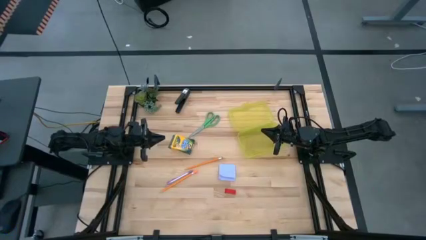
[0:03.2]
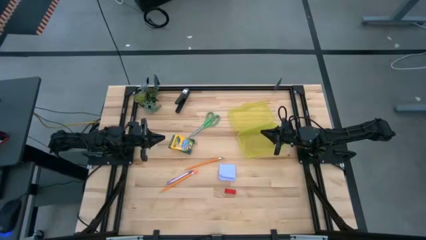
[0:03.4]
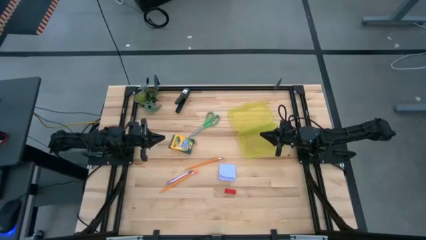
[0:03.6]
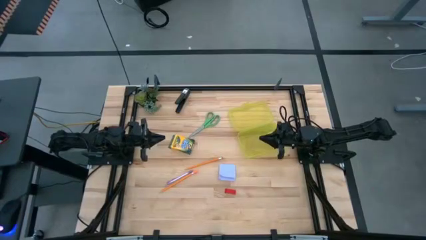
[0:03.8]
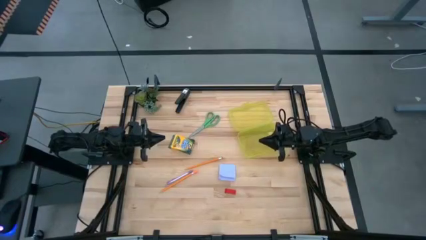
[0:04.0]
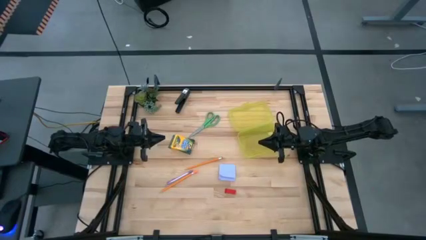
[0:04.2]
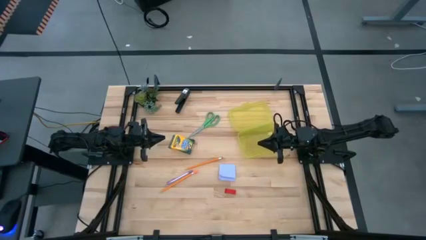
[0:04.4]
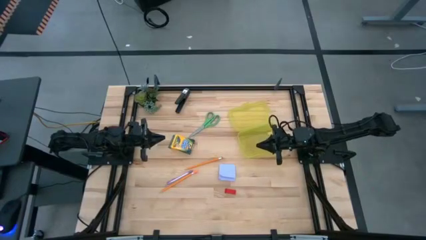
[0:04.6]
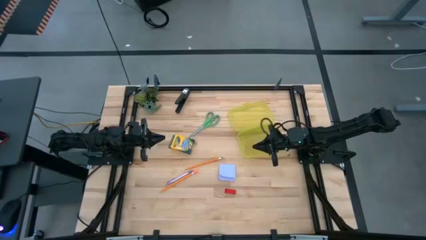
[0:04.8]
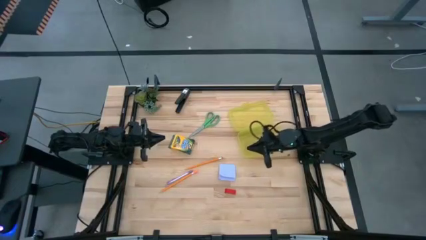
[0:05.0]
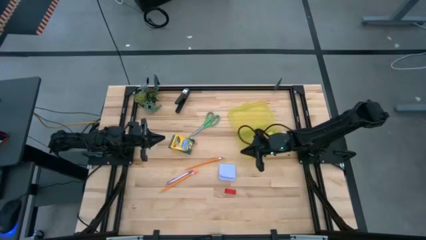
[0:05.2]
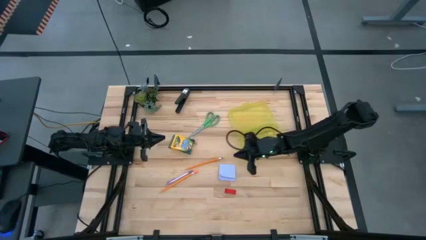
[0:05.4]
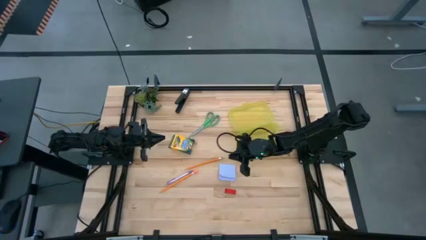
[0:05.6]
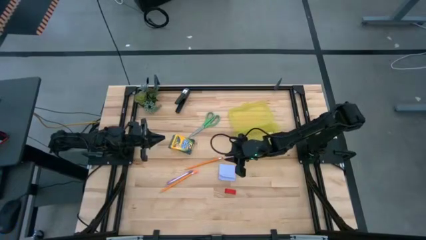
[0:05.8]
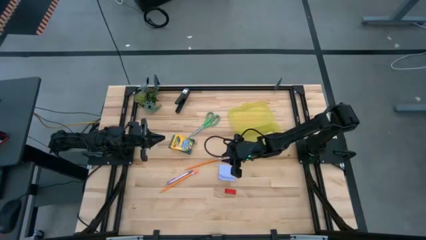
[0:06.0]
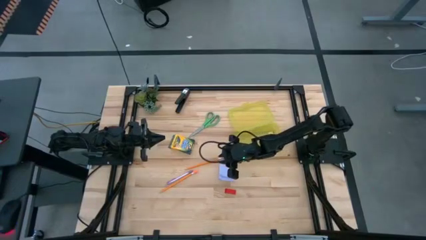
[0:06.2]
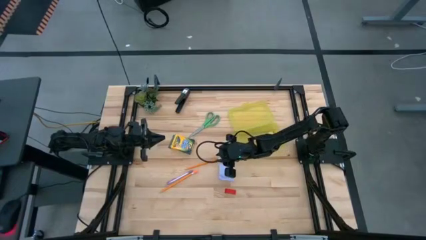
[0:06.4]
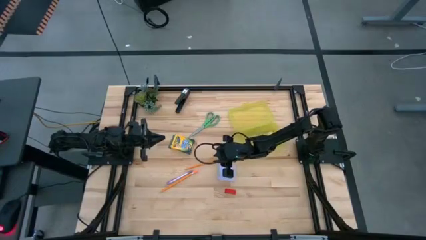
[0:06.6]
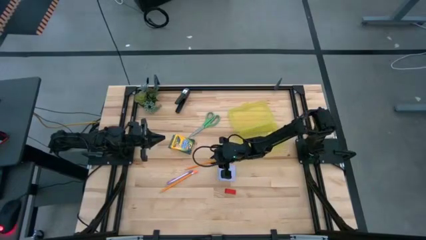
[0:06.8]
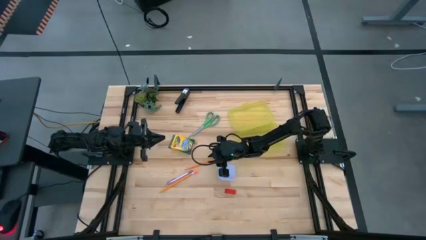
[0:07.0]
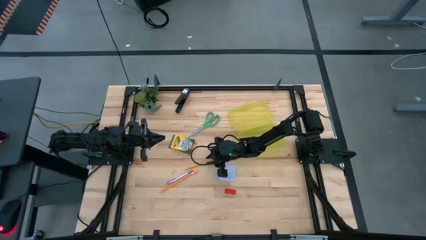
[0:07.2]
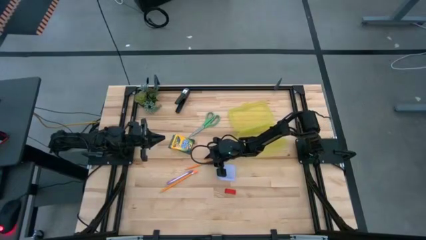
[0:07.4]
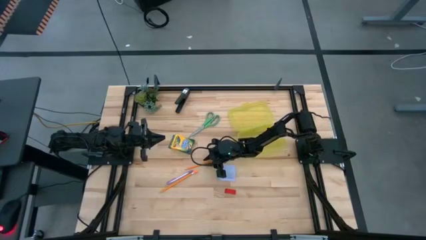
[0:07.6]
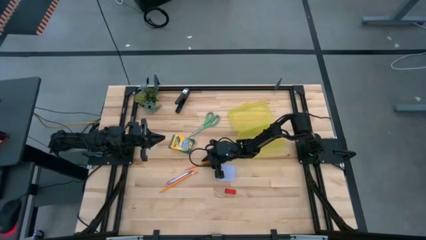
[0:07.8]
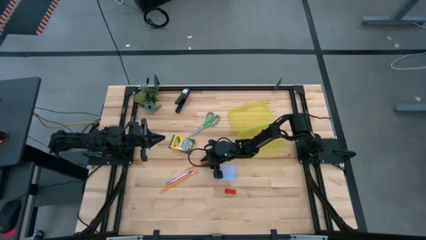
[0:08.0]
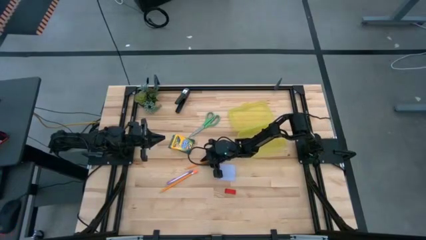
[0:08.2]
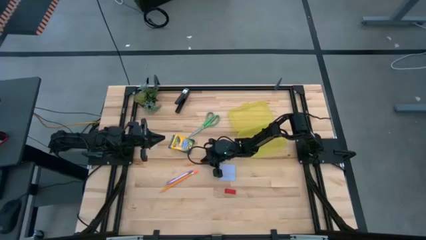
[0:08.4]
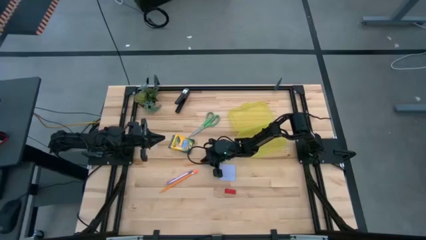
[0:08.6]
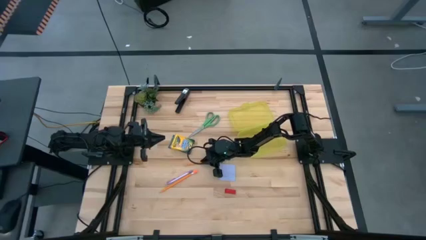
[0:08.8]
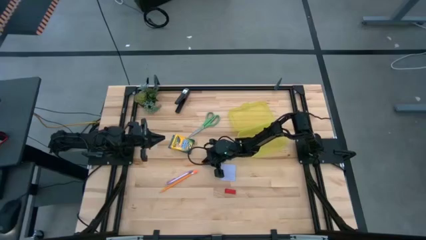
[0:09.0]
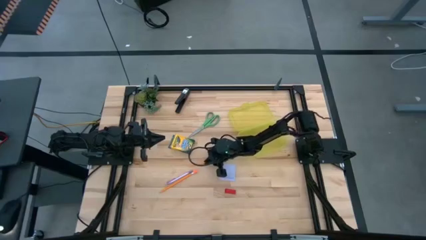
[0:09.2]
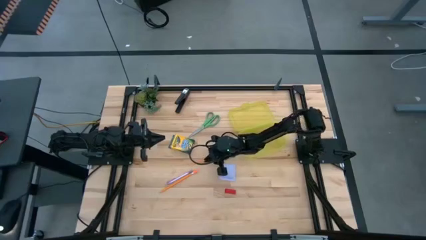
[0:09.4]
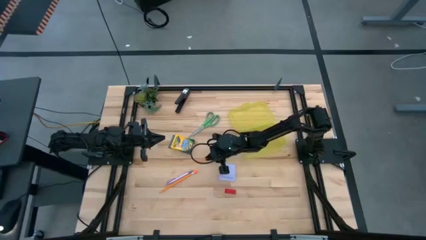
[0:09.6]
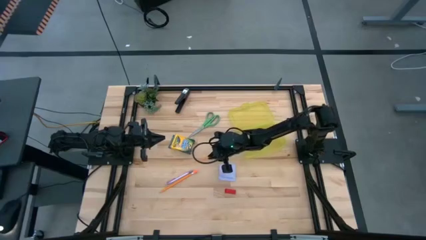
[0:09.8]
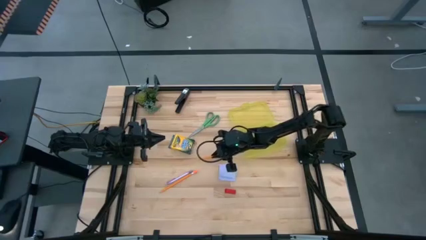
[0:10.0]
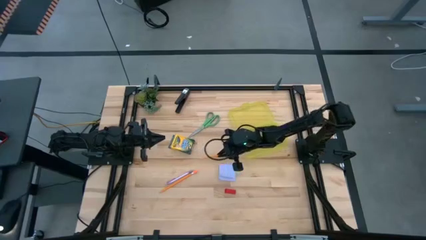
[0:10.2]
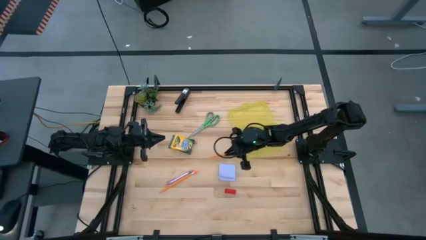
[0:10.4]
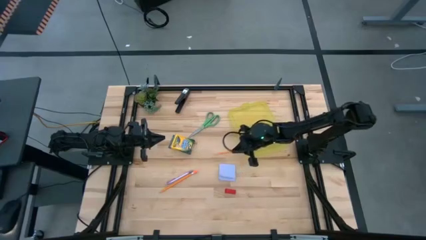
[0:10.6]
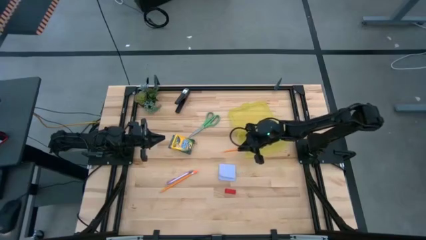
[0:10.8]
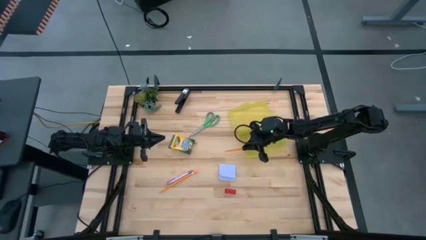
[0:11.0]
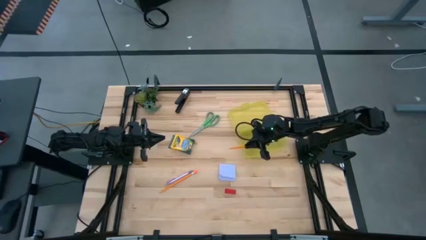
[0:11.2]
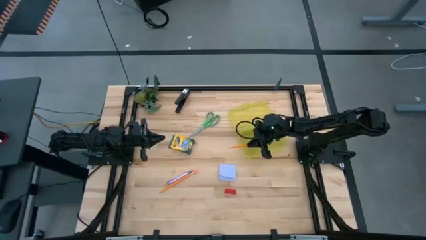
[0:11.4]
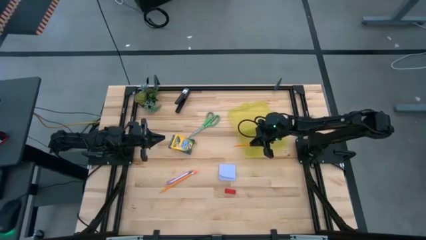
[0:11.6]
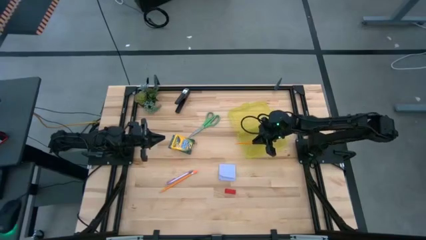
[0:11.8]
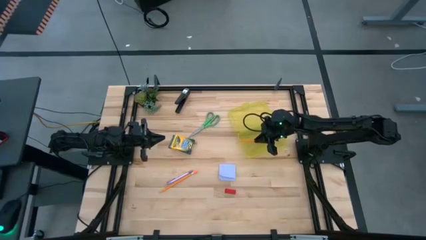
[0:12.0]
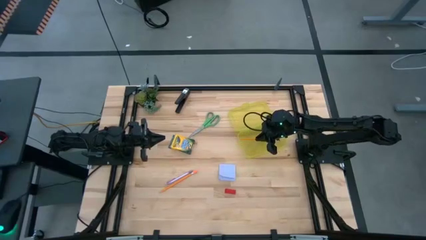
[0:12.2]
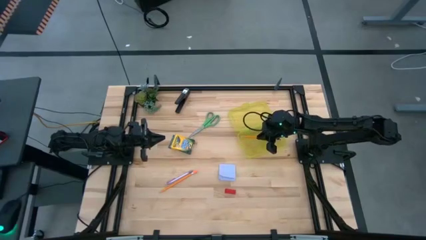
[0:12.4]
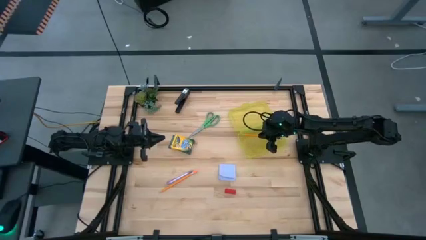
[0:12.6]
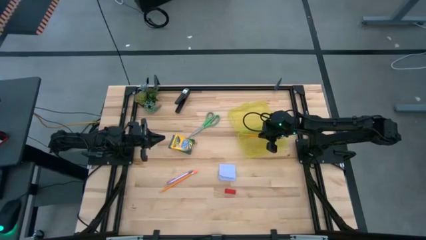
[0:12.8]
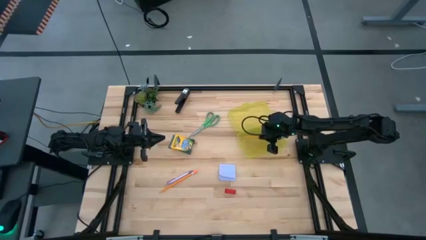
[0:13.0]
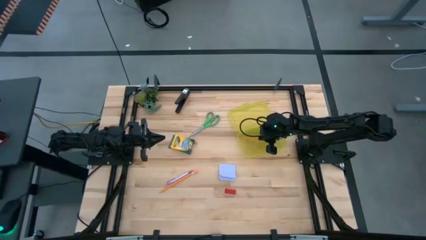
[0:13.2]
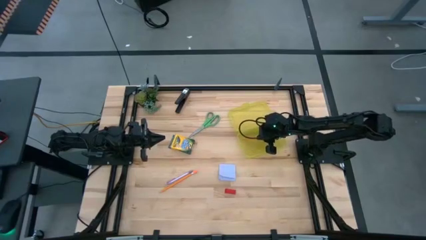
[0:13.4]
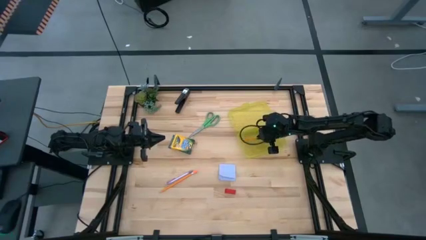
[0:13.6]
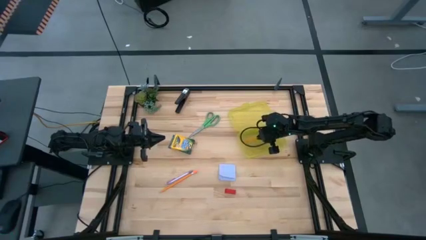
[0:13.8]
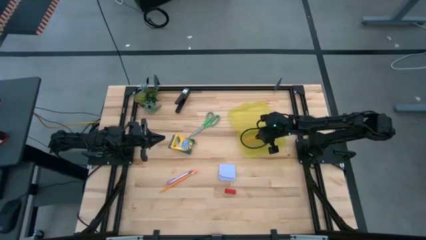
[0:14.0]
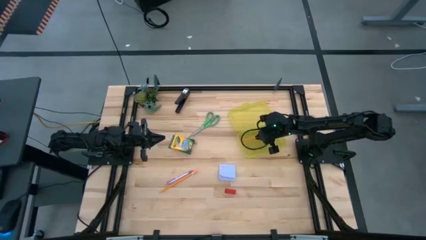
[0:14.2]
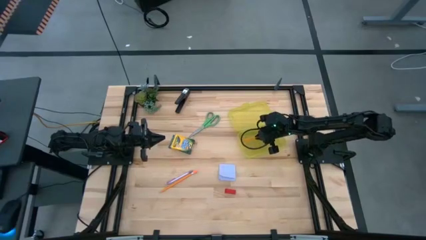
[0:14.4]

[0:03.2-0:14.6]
Task: Pack school essentials
Put the top yellow pencil into the yellow supply box

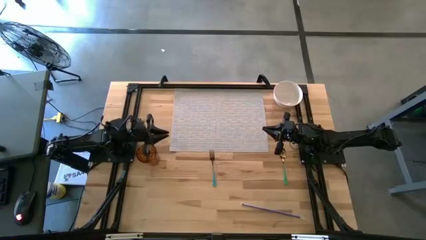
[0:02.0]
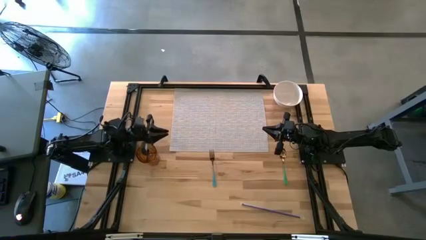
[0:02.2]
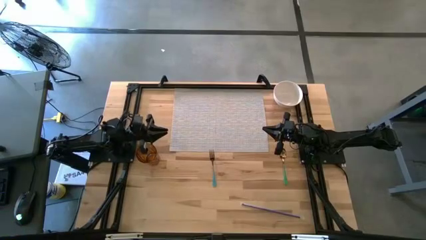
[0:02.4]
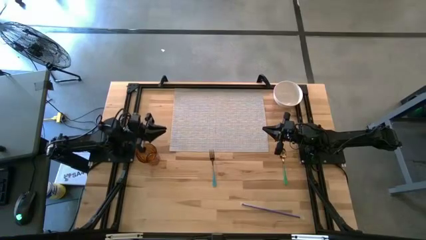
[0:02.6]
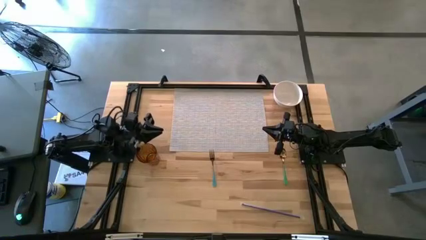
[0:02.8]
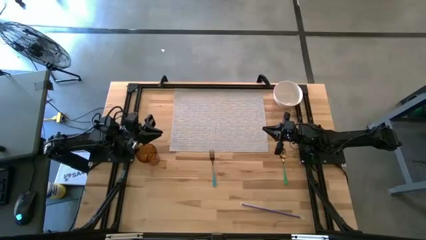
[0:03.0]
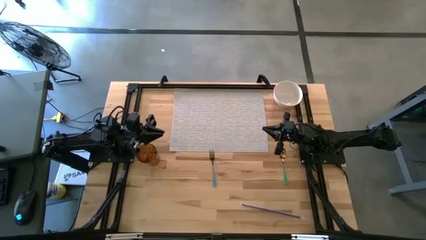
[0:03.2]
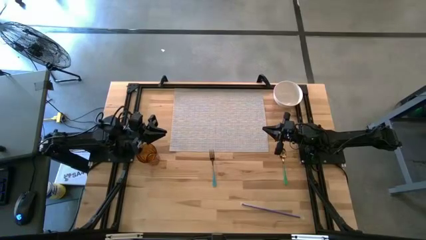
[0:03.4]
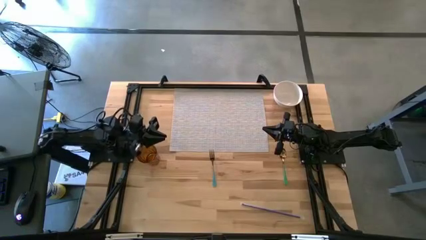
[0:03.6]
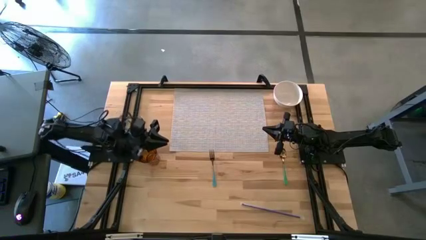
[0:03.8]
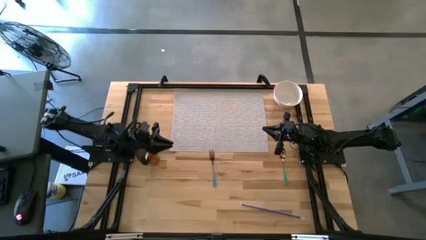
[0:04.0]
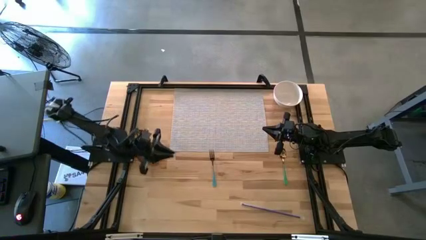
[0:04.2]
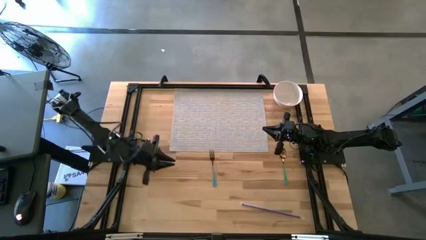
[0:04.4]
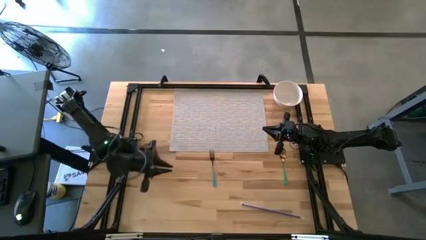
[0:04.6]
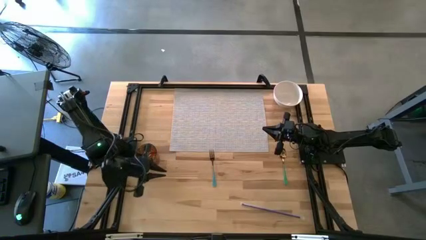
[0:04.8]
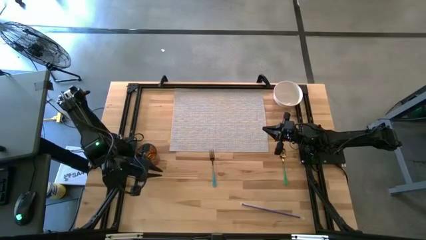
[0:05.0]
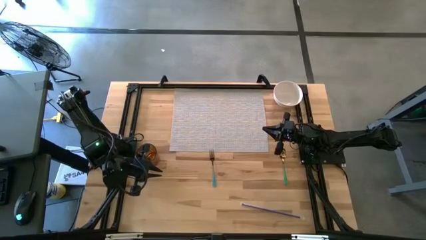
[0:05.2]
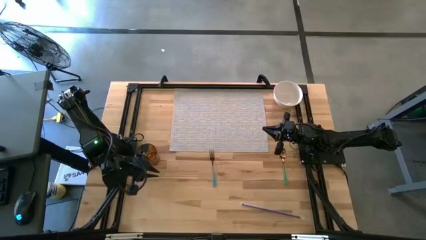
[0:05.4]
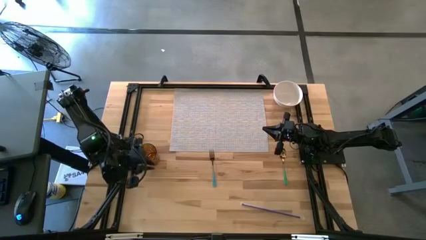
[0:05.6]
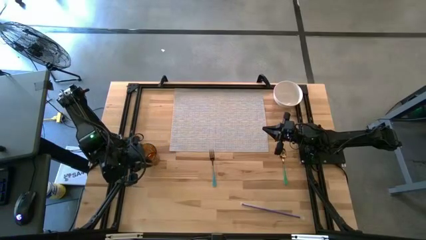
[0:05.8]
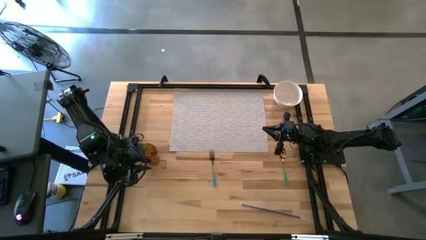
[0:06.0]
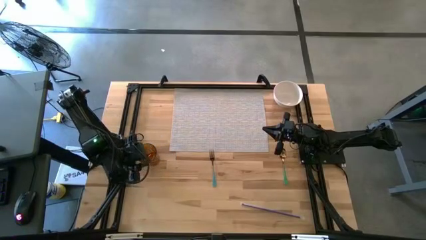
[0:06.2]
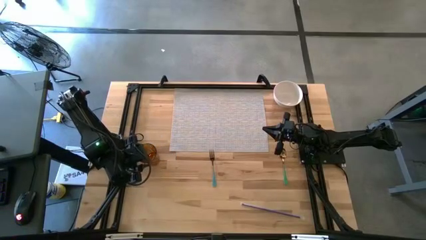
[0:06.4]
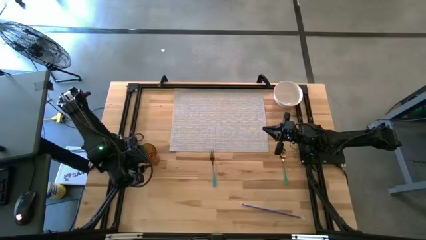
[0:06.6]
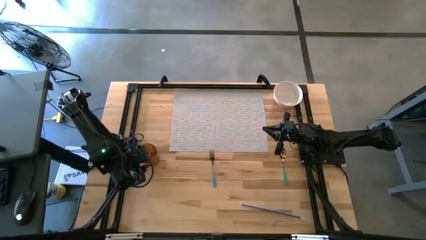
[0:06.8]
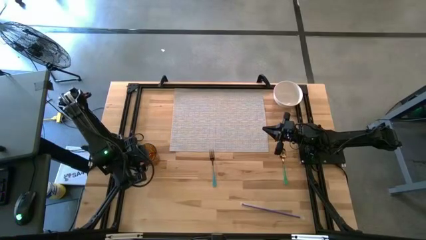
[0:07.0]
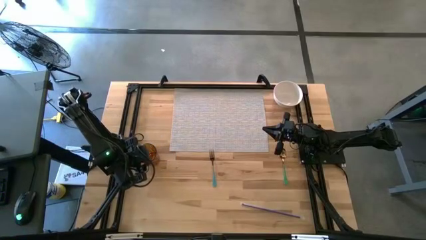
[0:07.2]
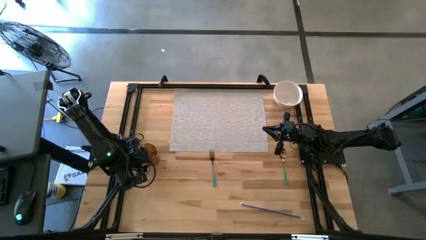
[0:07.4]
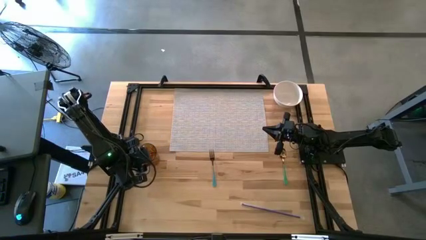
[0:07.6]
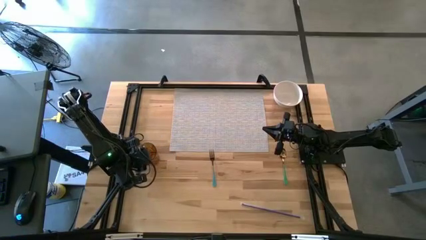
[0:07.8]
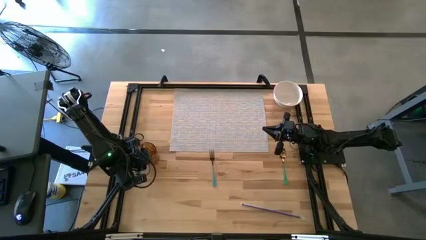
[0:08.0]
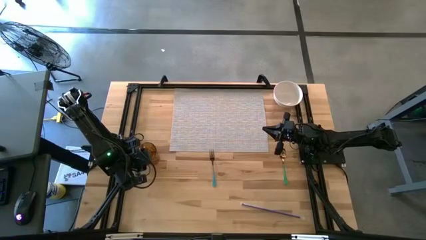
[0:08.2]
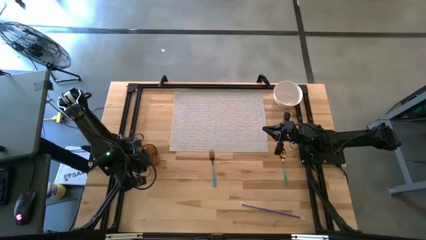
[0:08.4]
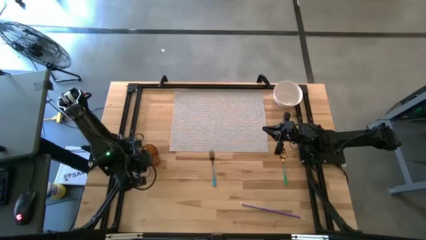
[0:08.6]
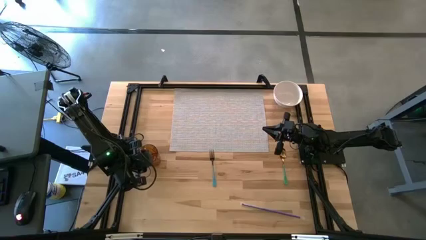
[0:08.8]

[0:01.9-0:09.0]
Task: Pick & Place Utensil
Put the brown cup on the gray mat
